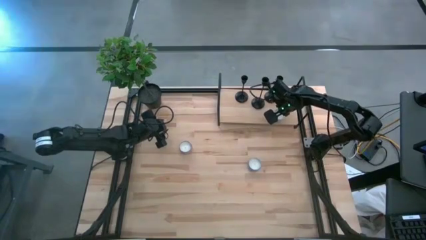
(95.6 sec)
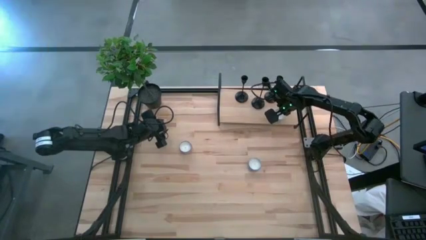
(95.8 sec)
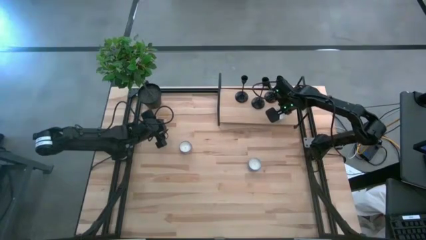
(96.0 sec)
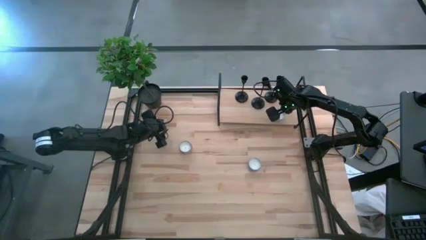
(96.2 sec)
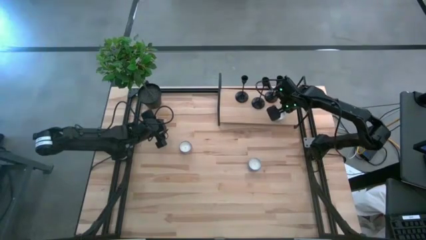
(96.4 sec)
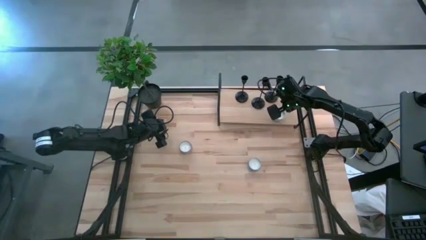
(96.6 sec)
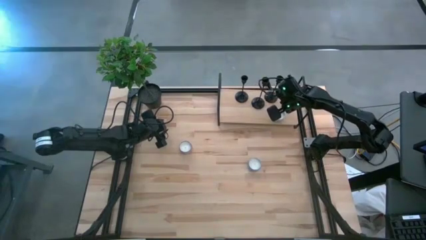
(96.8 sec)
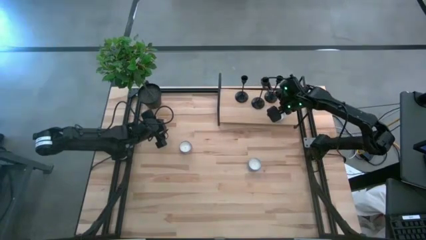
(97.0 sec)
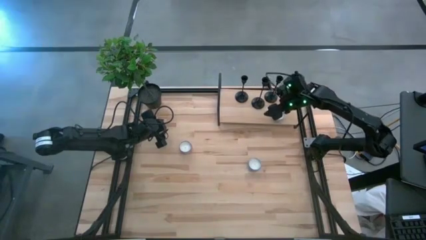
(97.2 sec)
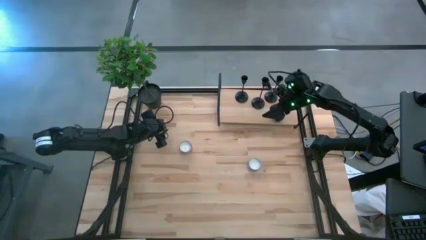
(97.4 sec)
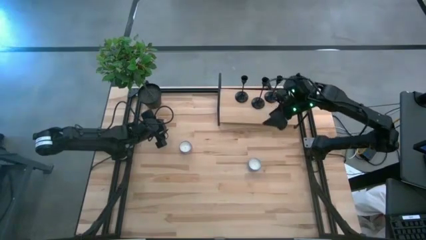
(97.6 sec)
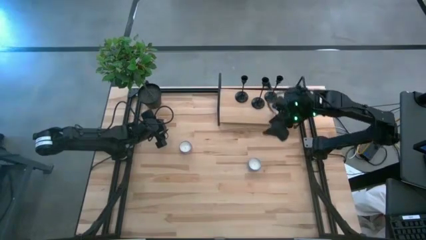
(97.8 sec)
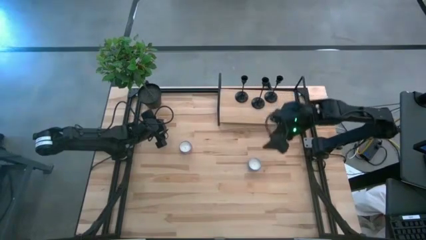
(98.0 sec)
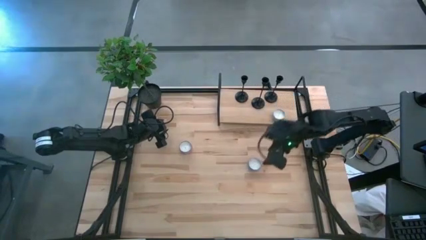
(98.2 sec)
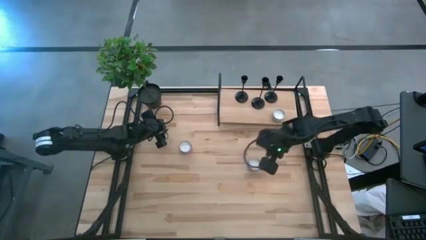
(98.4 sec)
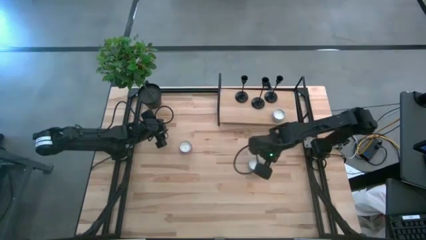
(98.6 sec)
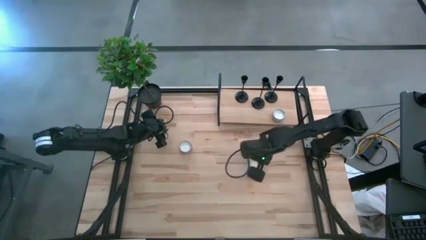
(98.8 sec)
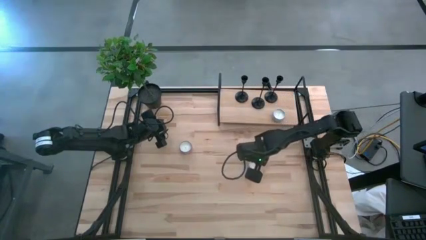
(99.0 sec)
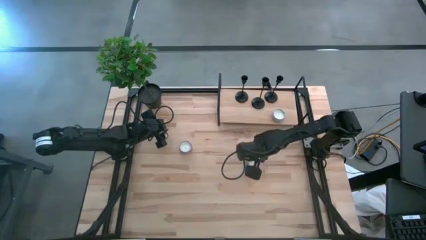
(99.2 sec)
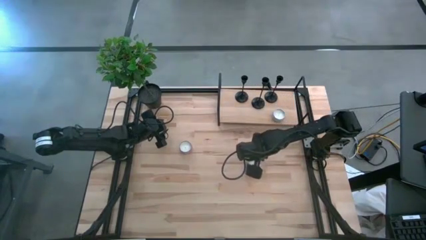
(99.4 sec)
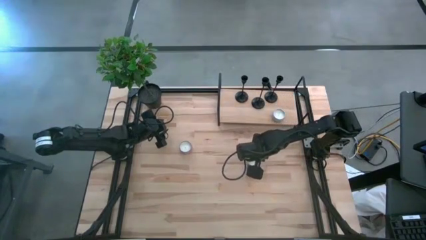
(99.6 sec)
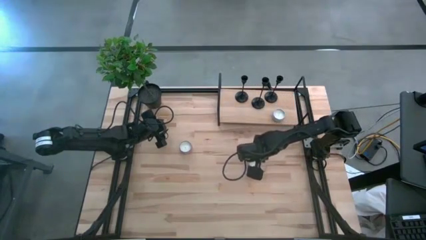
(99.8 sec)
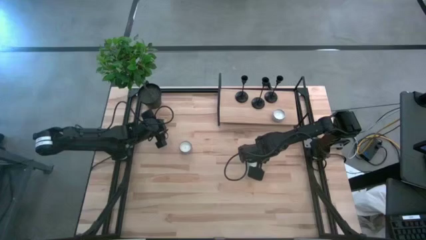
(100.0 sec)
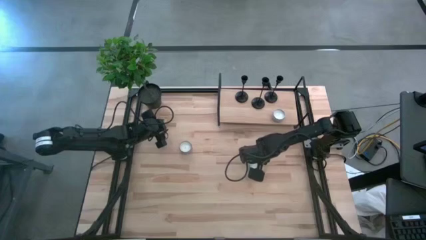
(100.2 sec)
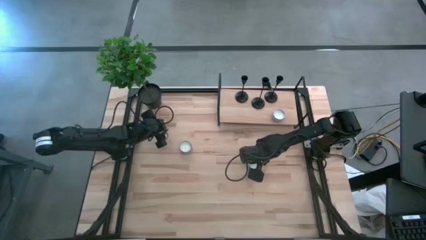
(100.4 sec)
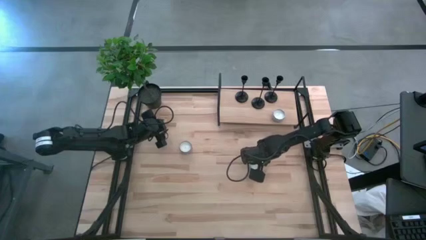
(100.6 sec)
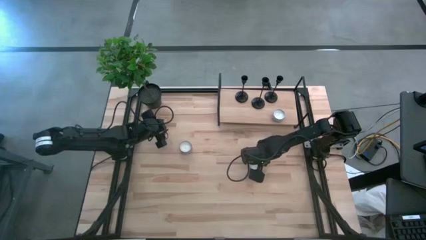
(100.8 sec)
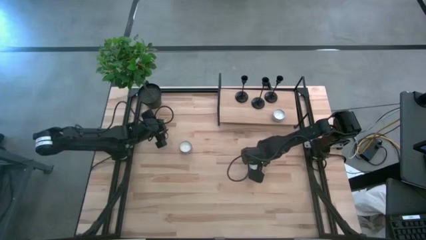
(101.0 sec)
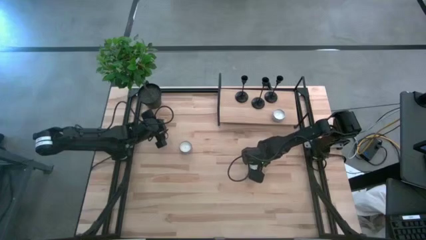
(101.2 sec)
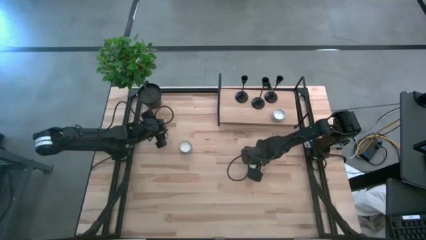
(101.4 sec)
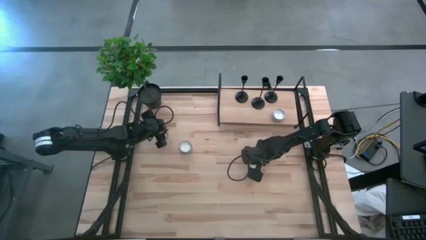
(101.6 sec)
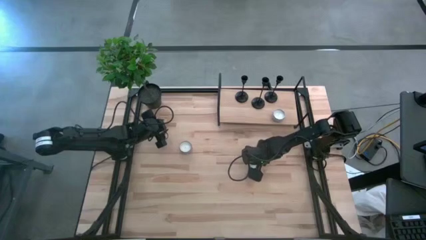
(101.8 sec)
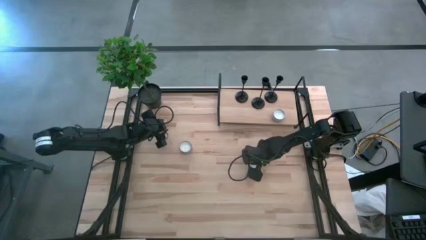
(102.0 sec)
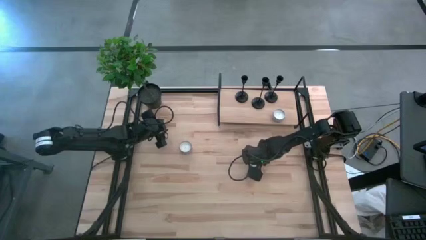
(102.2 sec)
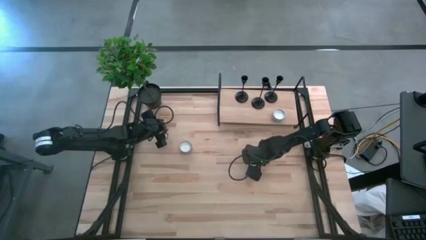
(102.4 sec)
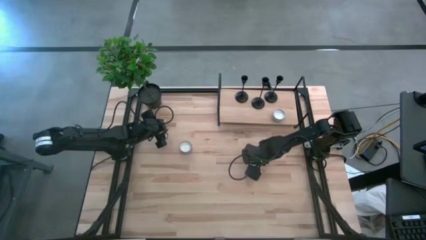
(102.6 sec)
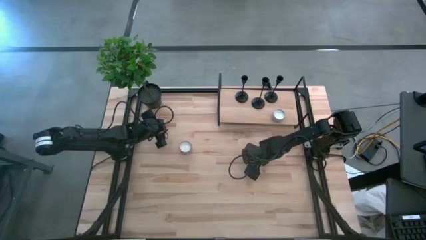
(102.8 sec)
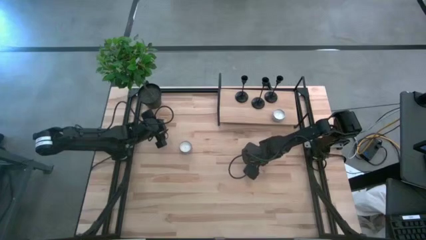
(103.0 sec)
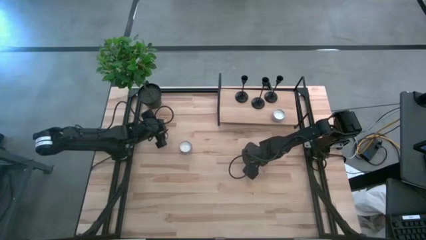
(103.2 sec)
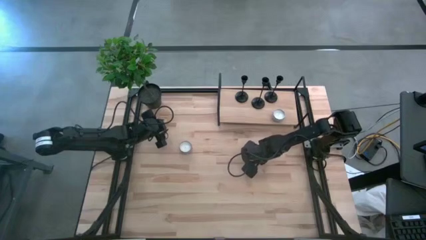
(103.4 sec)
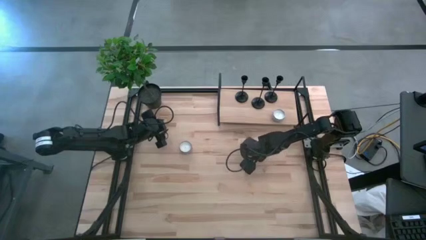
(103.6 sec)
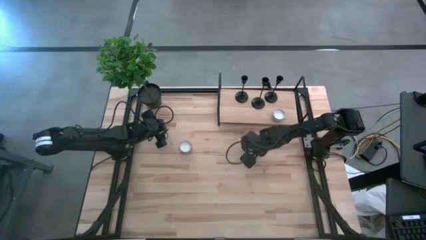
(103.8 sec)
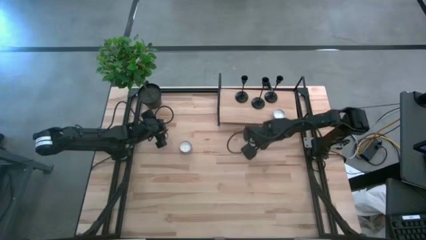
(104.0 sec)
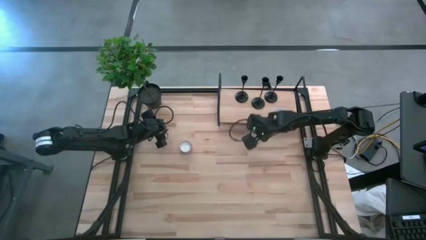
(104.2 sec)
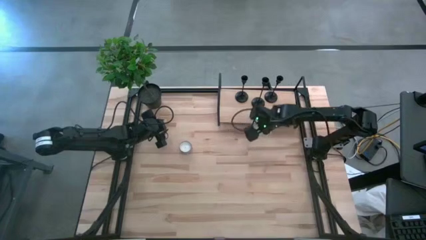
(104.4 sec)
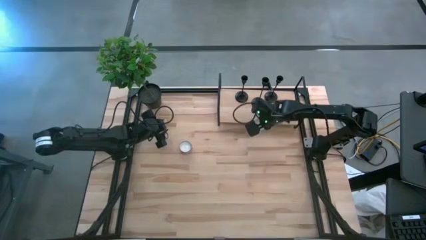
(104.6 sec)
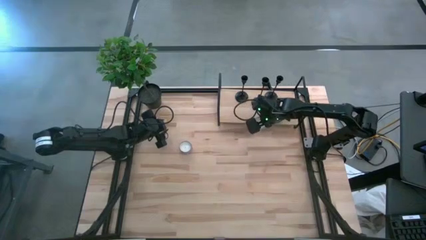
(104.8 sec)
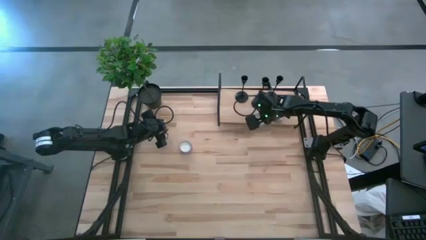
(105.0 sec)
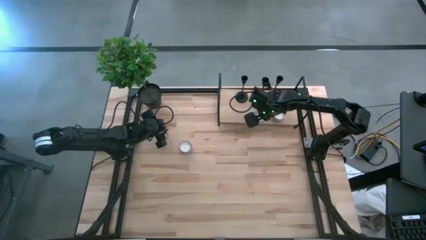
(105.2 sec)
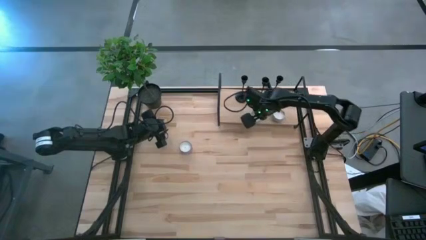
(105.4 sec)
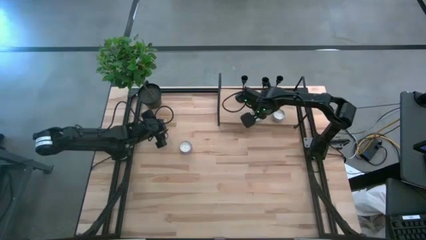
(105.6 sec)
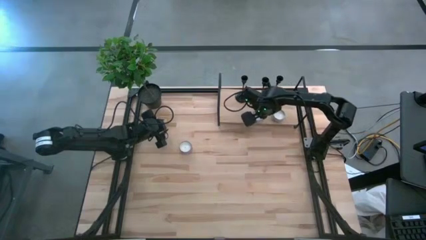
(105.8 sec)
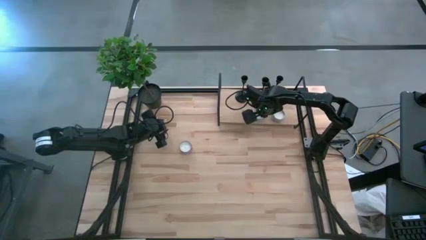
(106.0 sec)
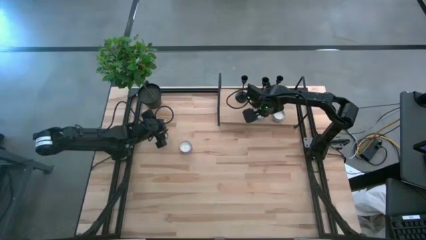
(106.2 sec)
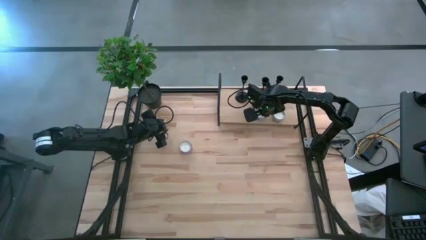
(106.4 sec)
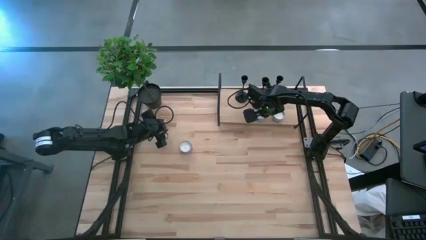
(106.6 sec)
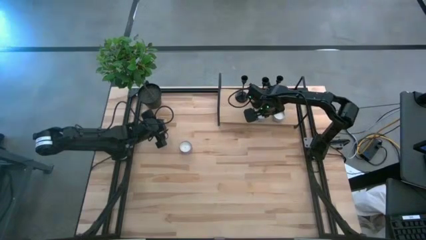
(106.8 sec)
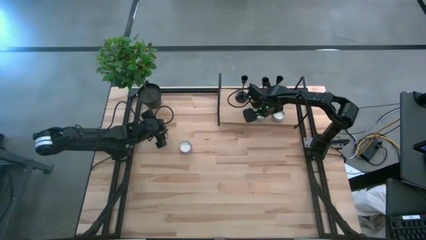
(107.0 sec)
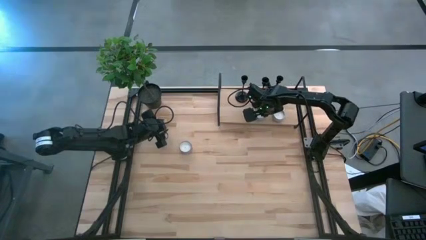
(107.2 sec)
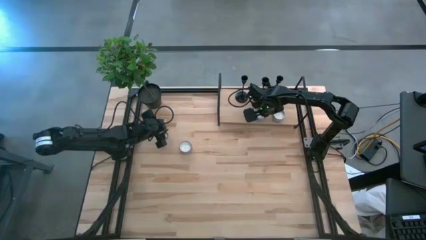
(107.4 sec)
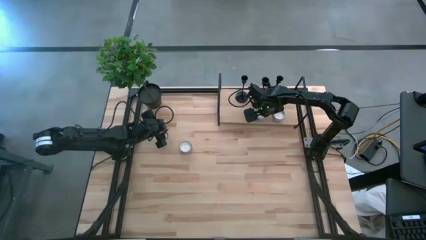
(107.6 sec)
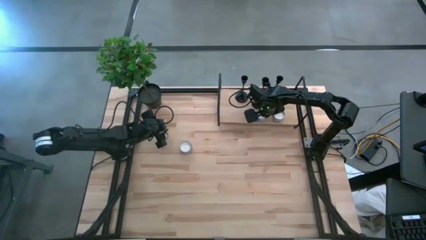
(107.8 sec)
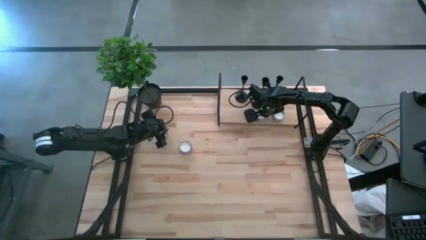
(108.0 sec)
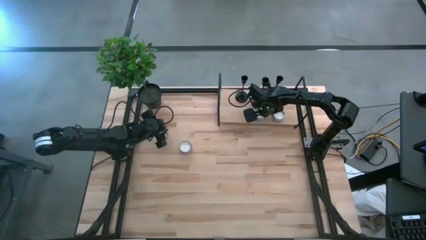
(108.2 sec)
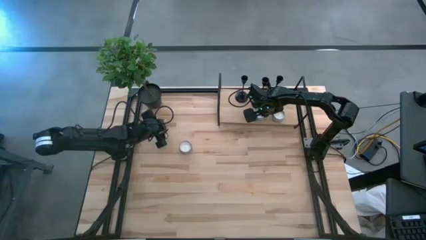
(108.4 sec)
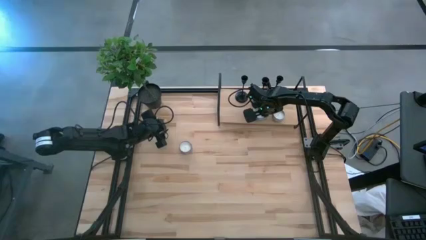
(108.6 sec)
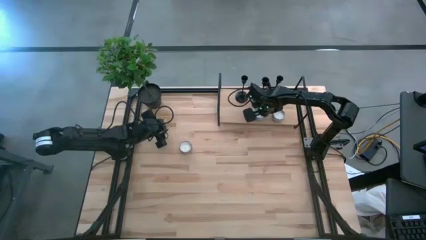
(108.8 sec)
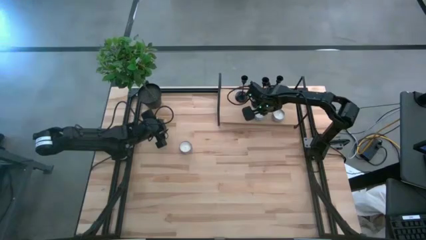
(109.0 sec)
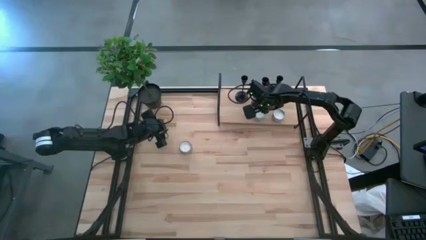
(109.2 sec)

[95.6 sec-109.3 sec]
Task: Pick & Place candle stick holders
Put the blue scented candle on the shelf
